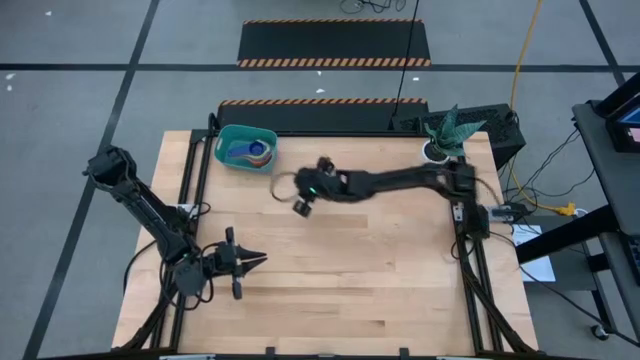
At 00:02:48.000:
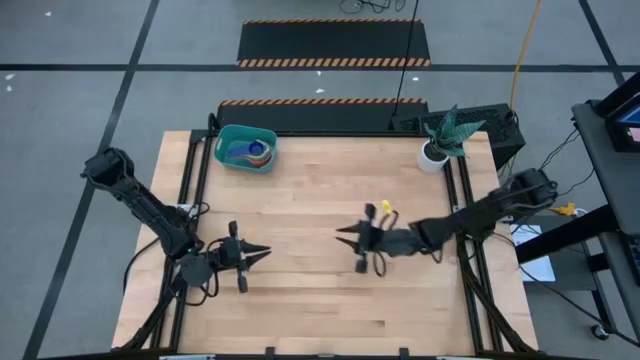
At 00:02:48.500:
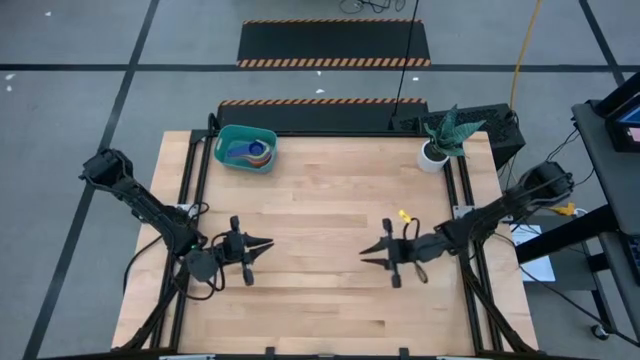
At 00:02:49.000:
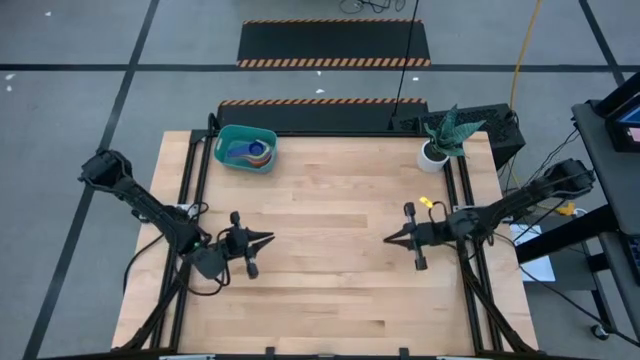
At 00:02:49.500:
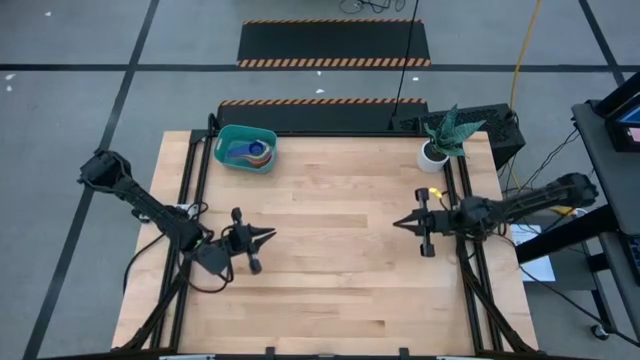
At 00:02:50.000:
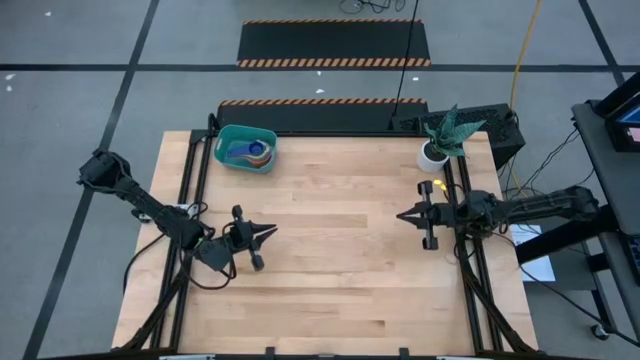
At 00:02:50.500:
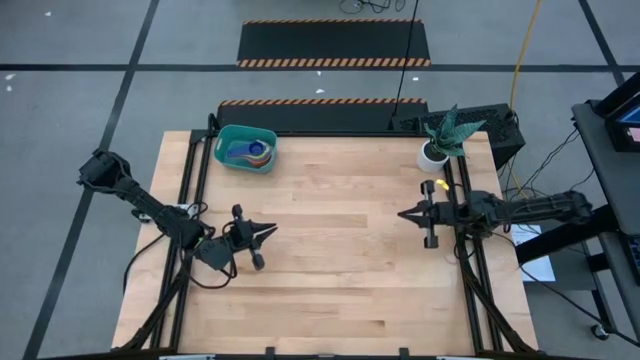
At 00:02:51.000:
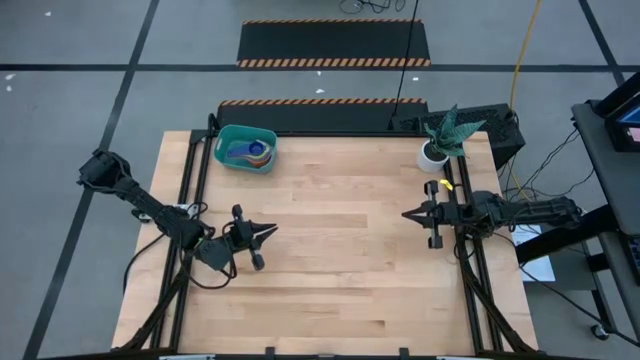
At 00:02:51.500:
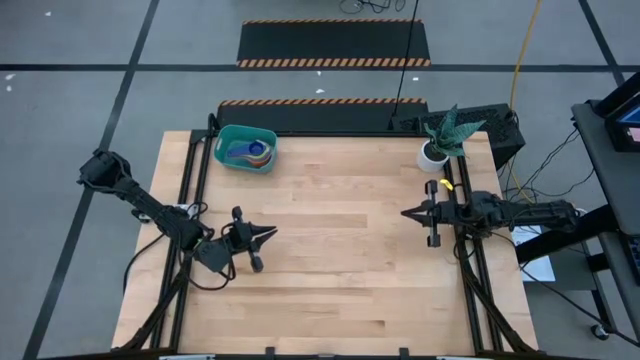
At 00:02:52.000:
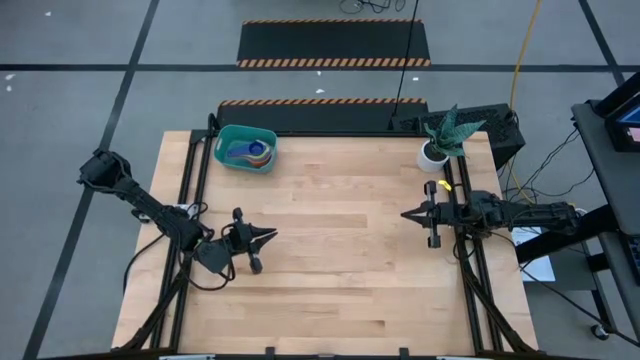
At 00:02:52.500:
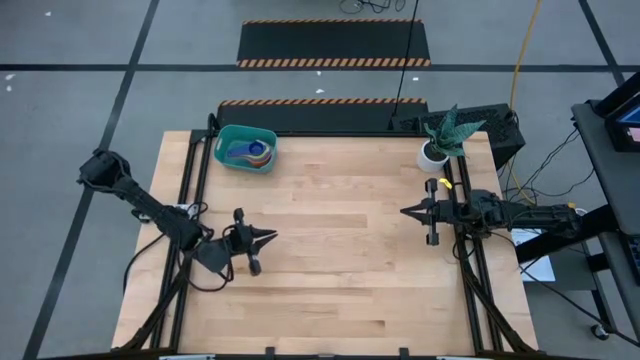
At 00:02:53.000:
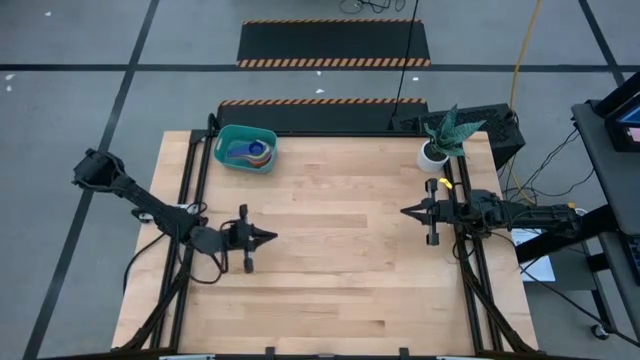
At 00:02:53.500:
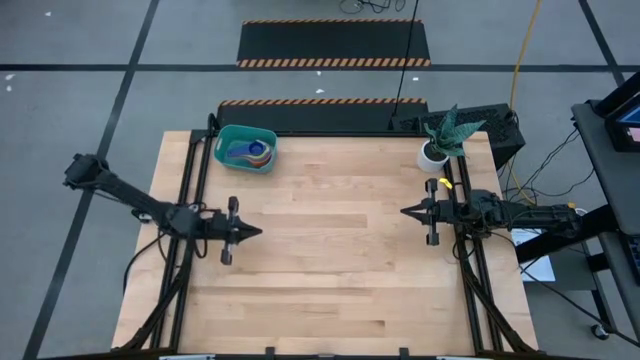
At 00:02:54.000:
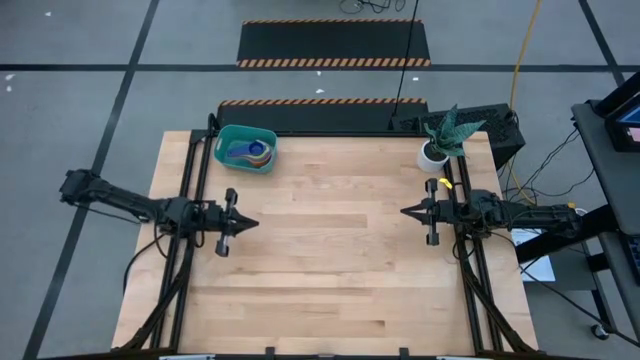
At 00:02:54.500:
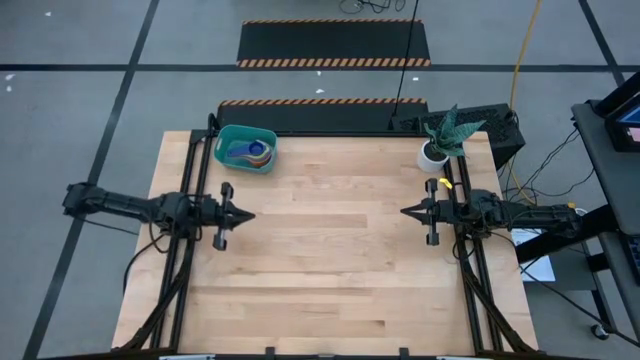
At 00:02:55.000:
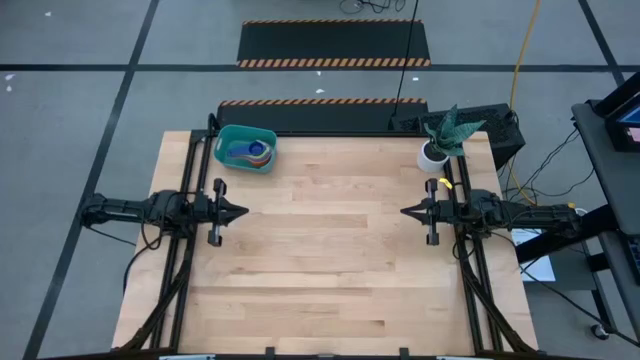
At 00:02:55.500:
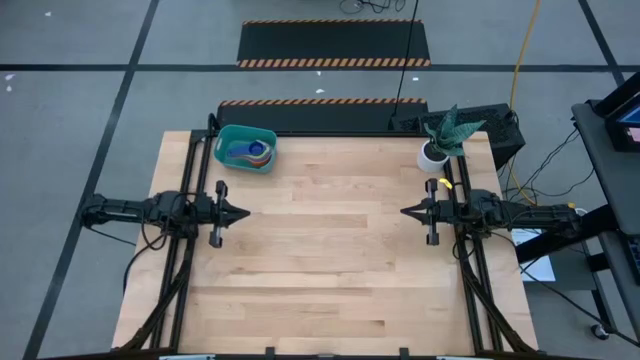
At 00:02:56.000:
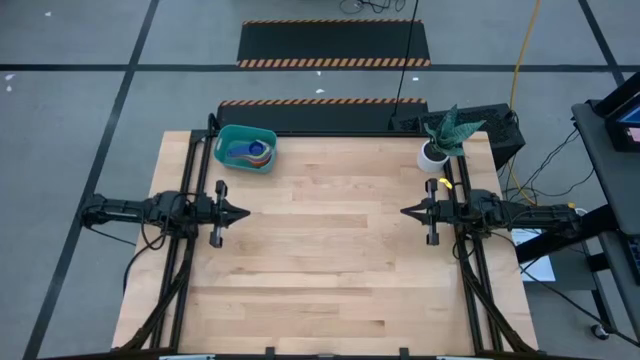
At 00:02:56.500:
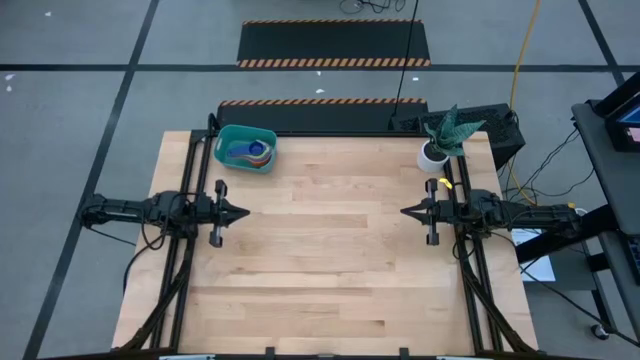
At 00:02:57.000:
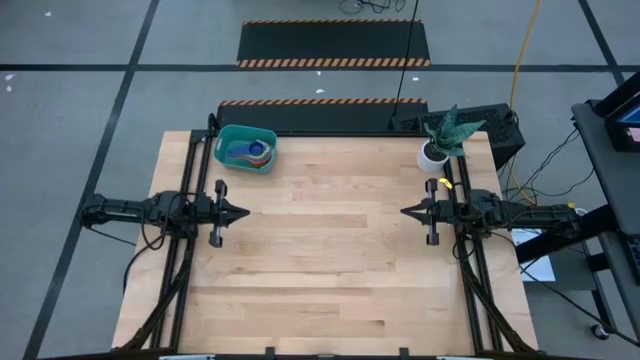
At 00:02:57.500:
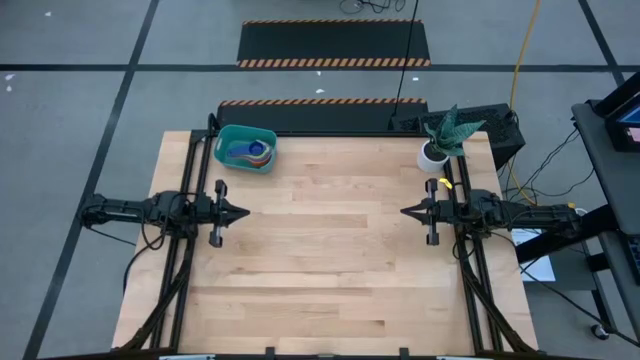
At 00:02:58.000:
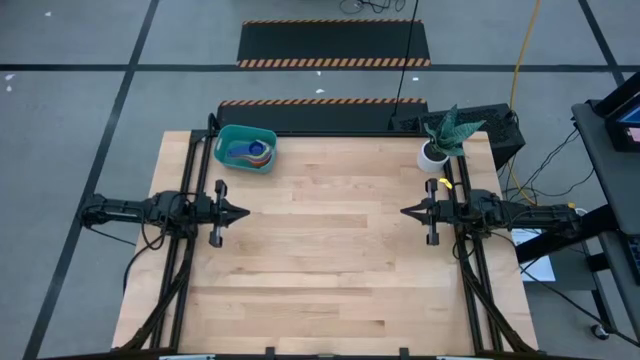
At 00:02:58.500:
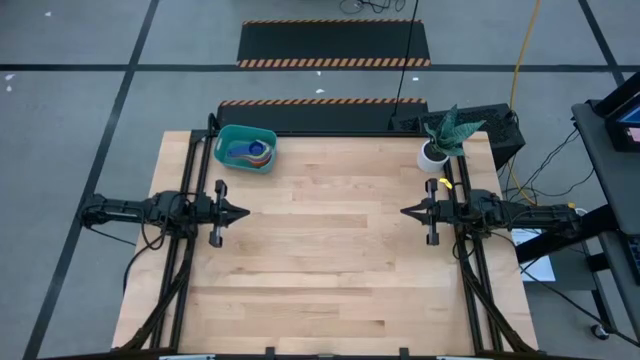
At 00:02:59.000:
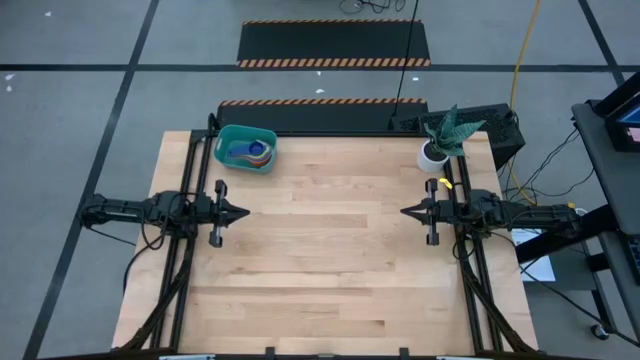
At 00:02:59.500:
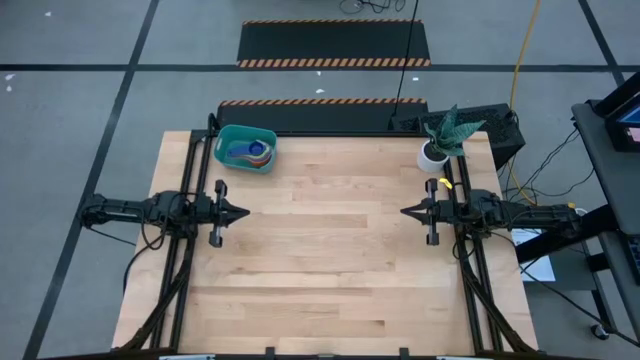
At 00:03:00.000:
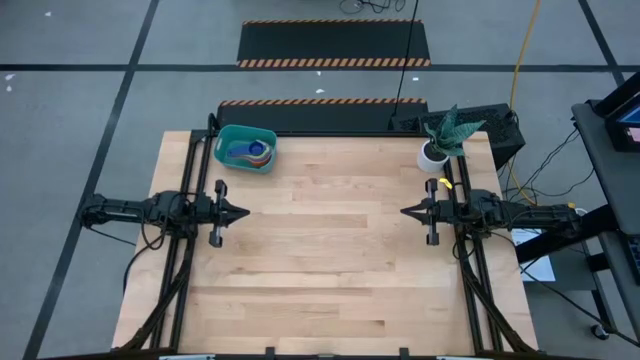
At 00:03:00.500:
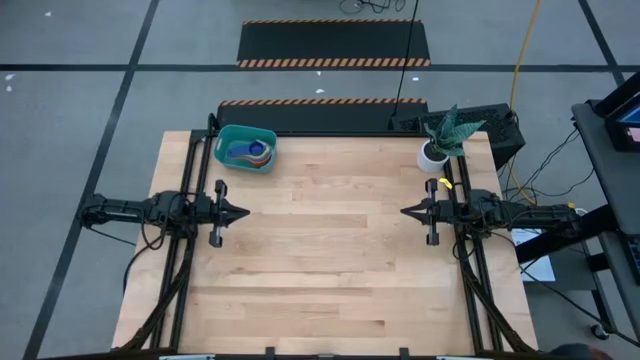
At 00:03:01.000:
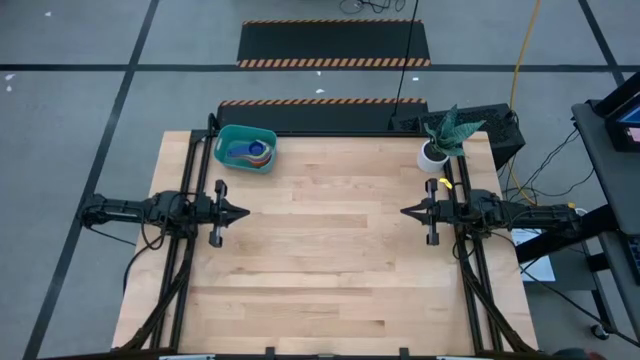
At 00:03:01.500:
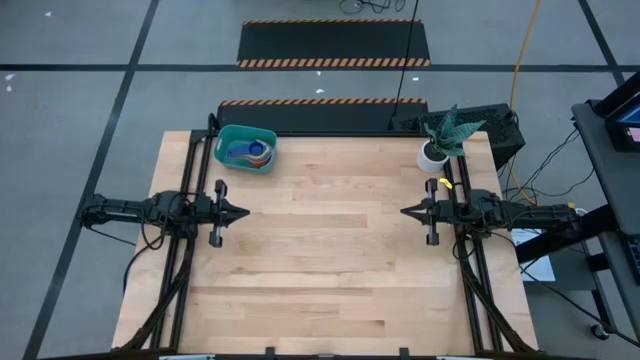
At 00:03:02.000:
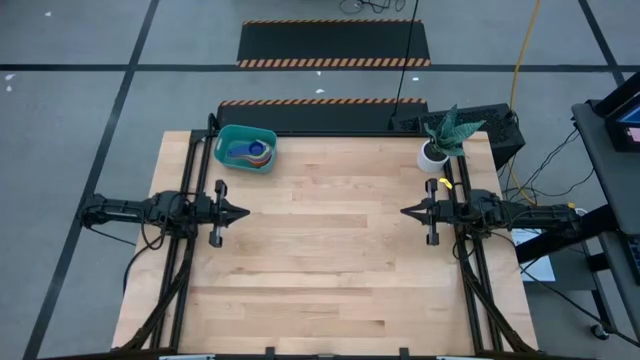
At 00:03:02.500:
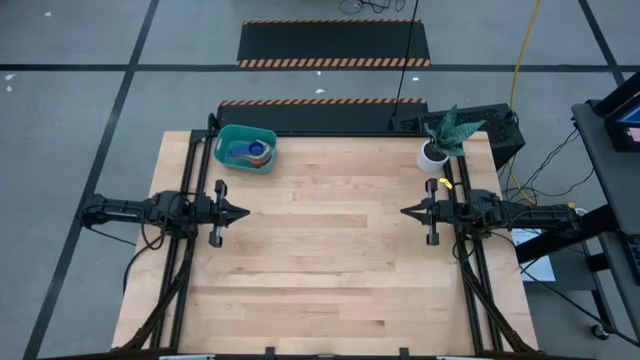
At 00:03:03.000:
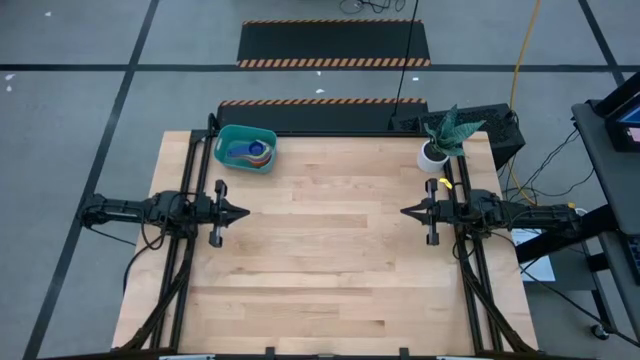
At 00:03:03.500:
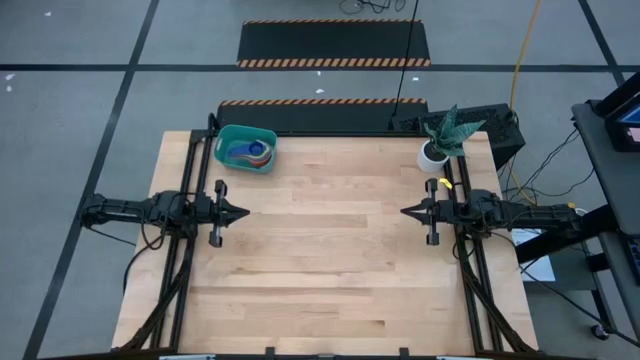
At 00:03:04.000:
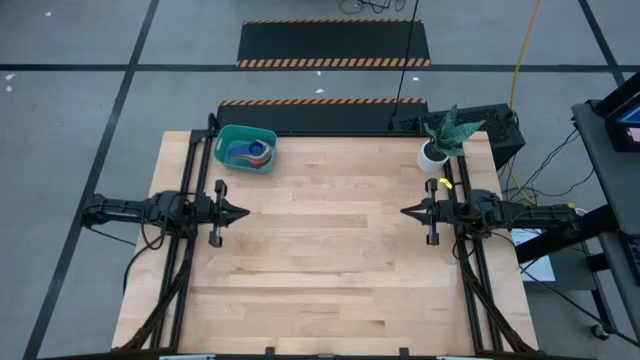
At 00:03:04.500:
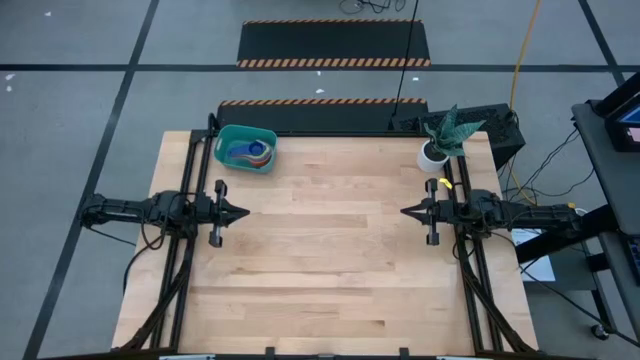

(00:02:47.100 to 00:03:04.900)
Task: Nest measuring cups in basket
Return to Home Position

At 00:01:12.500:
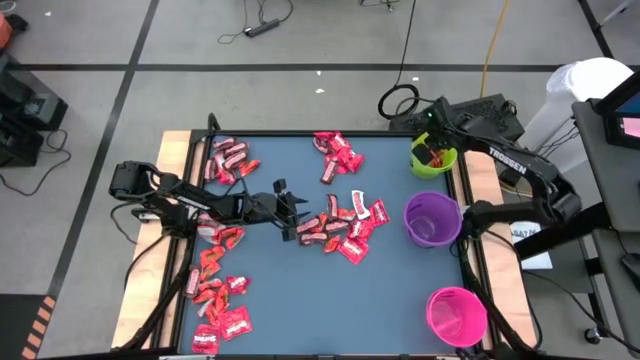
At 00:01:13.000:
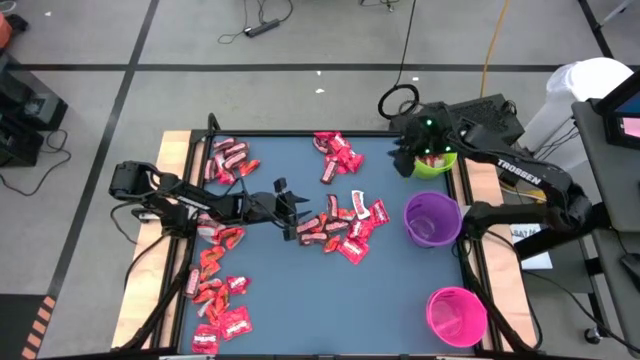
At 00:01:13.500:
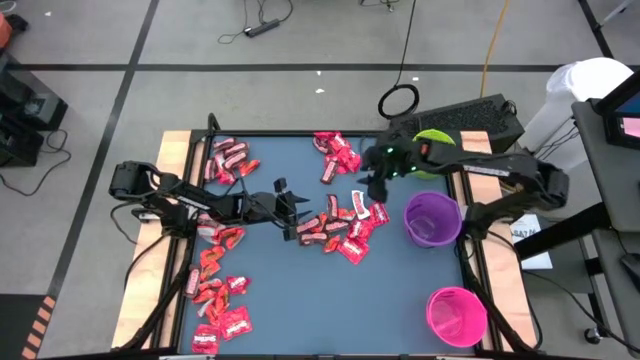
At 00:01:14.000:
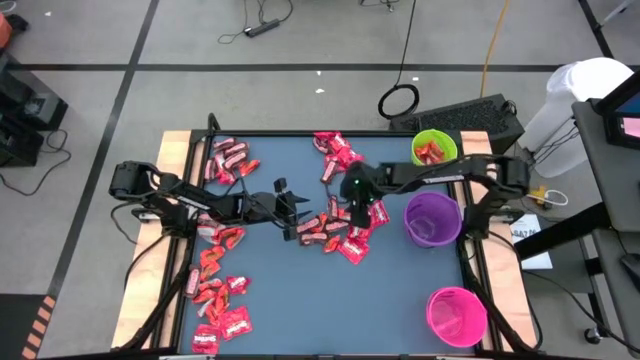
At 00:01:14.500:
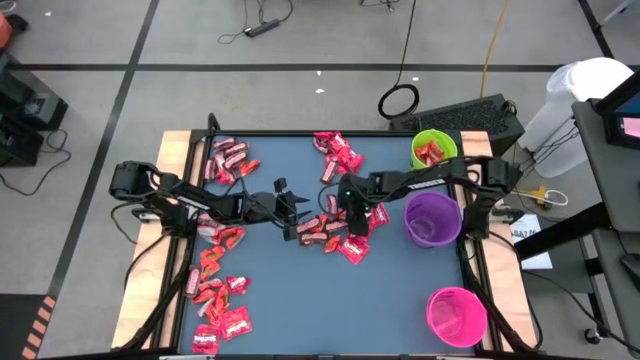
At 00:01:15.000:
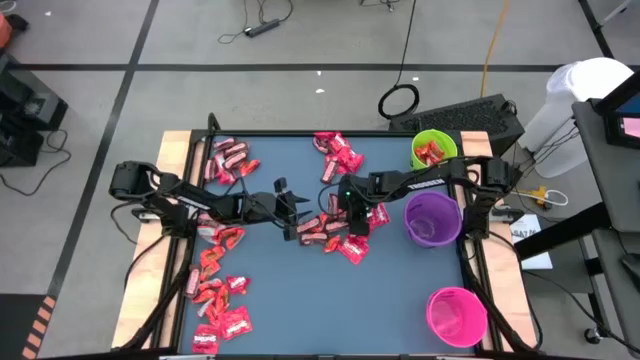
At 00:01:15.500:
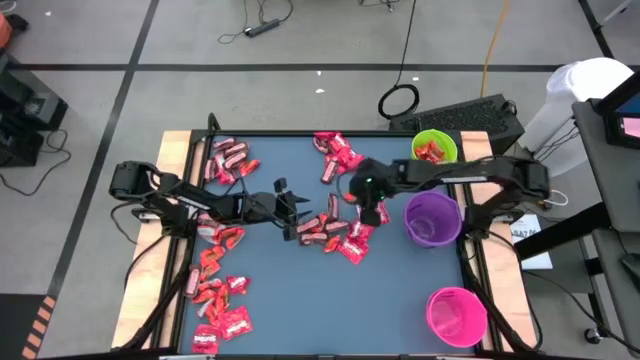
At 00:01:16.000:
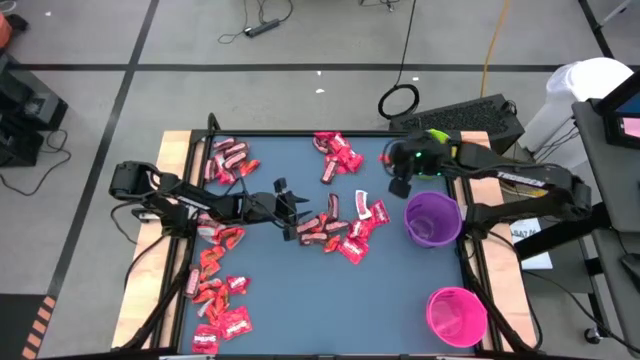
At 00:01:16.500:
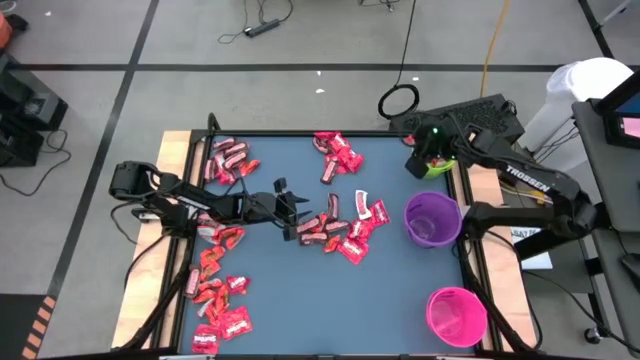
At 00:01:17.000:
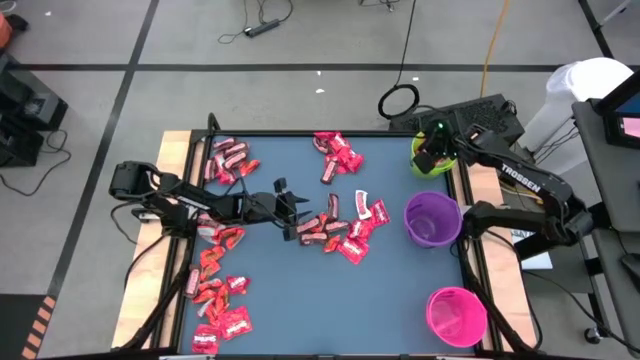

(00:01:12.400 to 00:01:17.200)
Task: Organize candy in baskets
Put the orange chocolate bar into the green bucket
